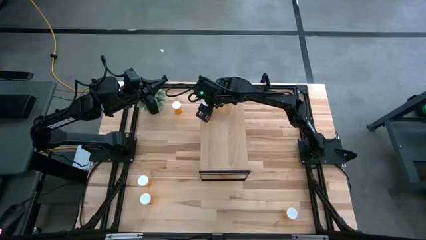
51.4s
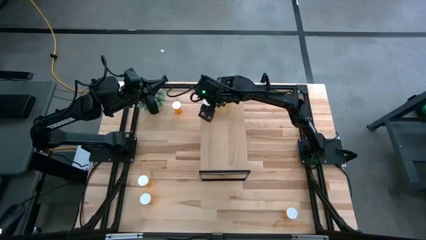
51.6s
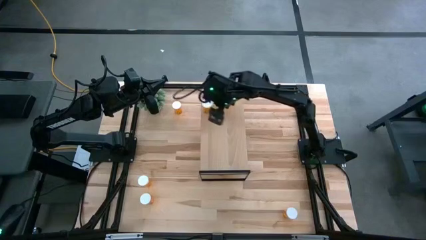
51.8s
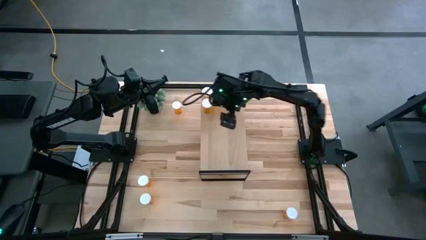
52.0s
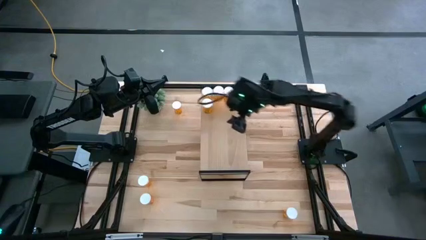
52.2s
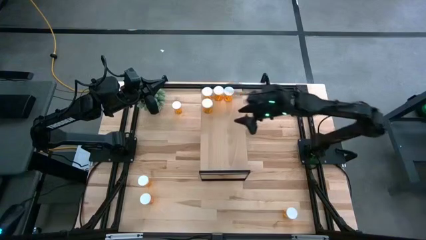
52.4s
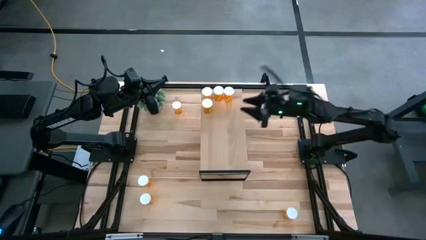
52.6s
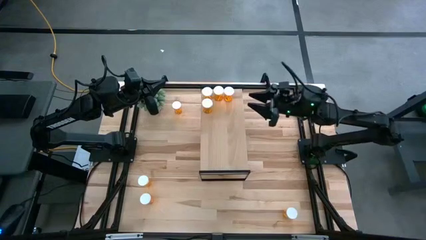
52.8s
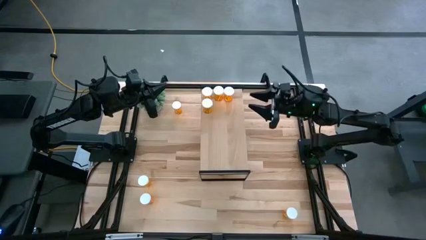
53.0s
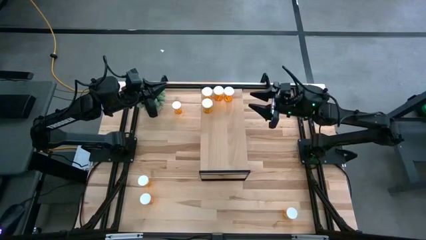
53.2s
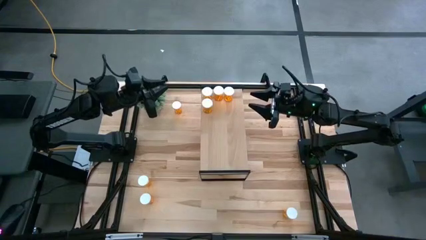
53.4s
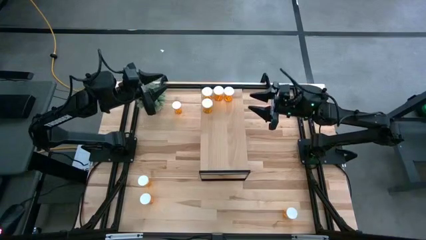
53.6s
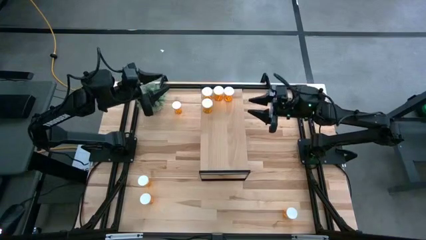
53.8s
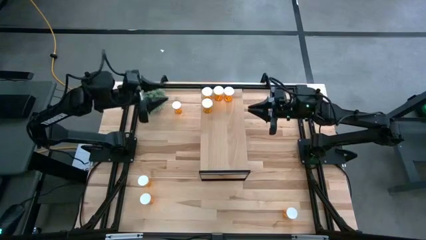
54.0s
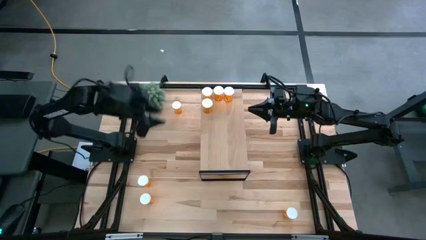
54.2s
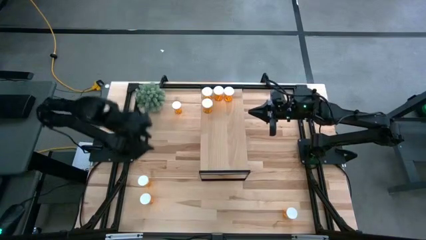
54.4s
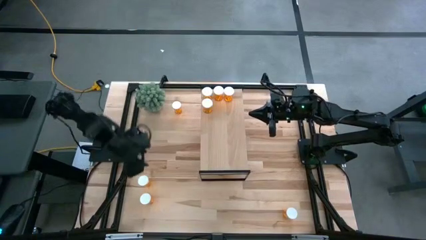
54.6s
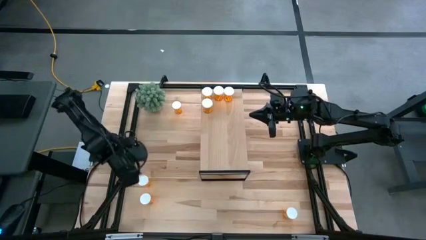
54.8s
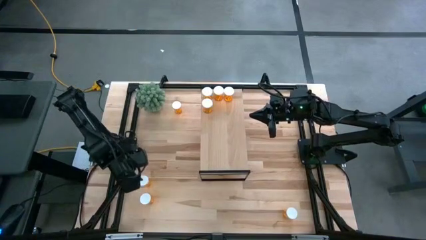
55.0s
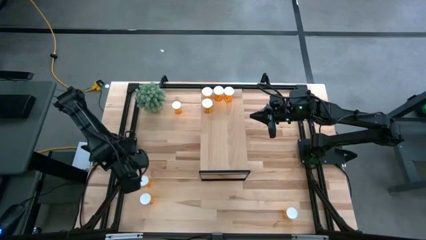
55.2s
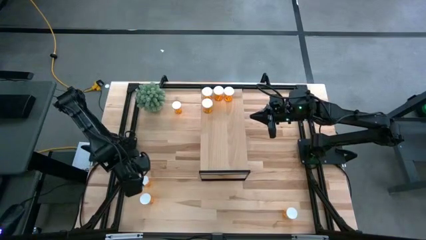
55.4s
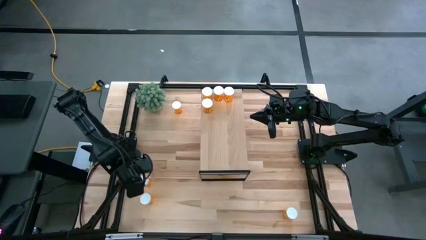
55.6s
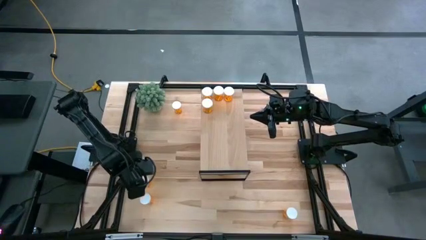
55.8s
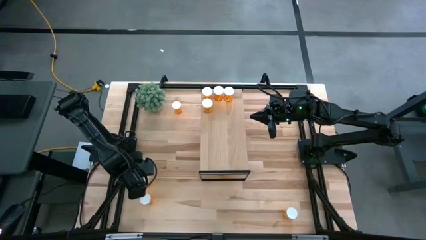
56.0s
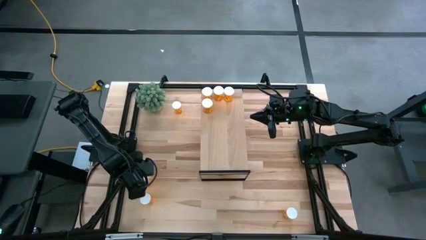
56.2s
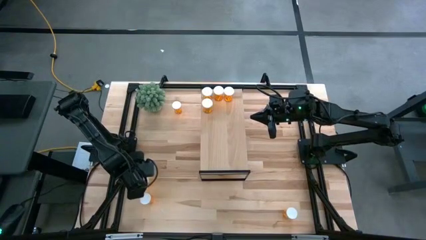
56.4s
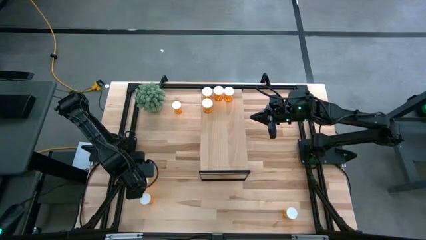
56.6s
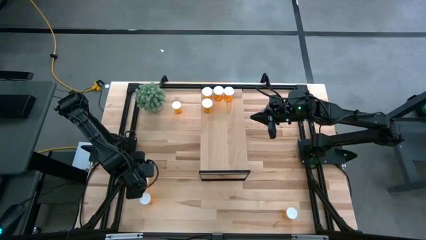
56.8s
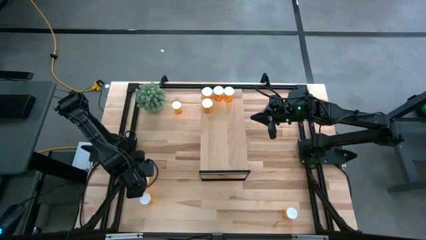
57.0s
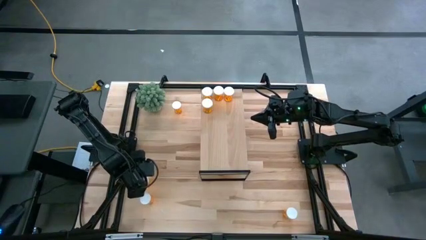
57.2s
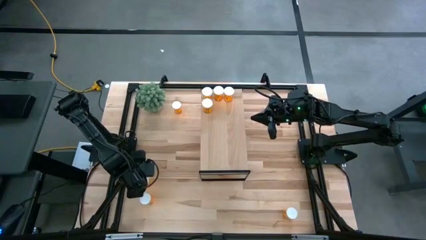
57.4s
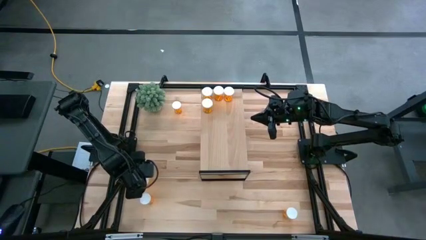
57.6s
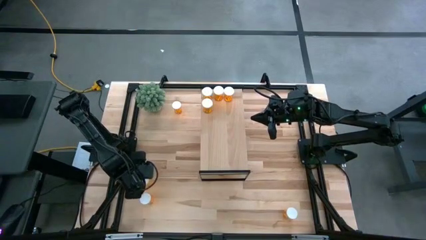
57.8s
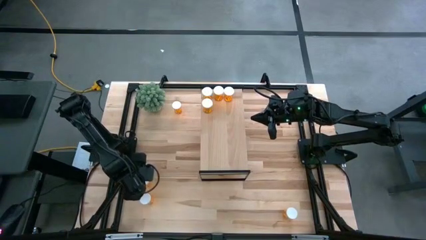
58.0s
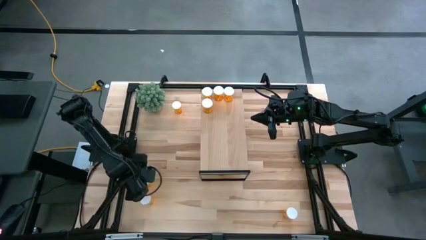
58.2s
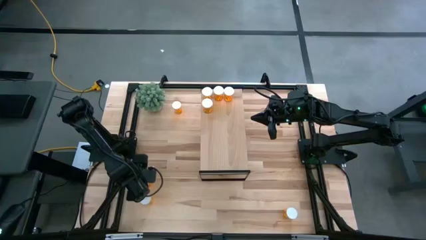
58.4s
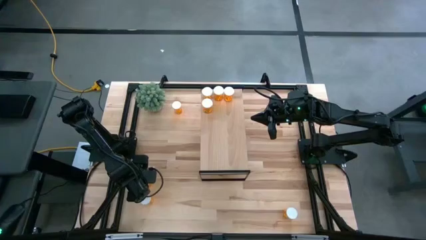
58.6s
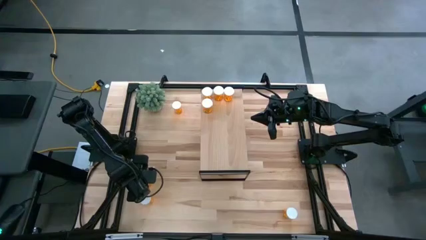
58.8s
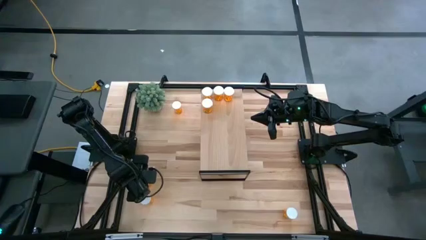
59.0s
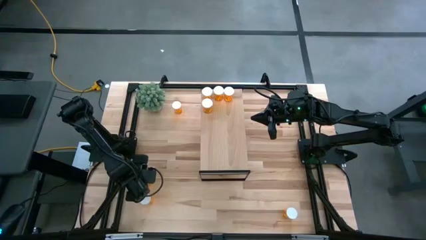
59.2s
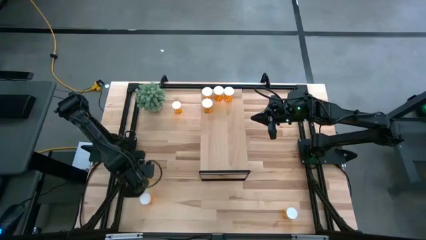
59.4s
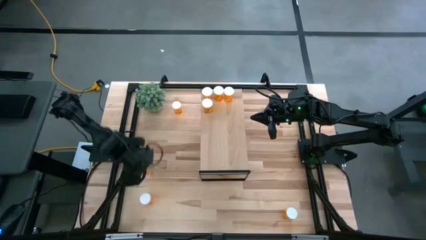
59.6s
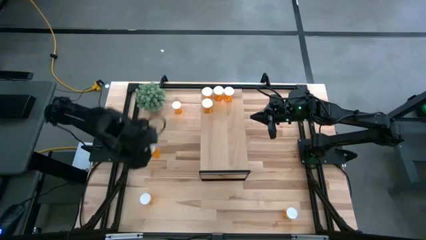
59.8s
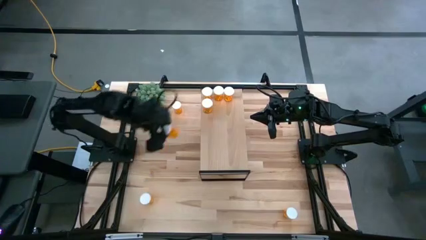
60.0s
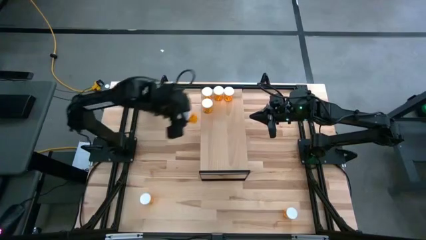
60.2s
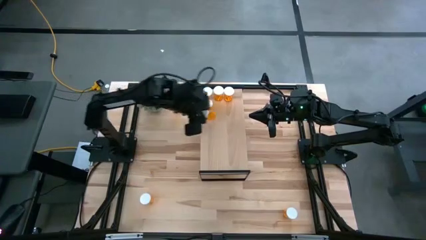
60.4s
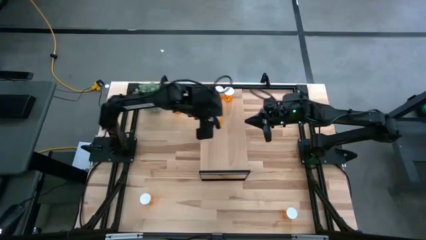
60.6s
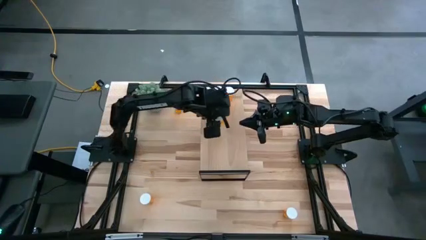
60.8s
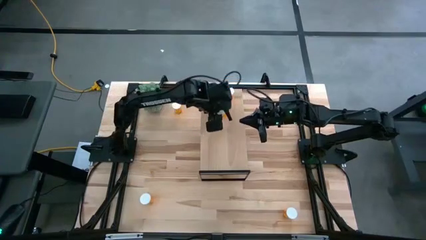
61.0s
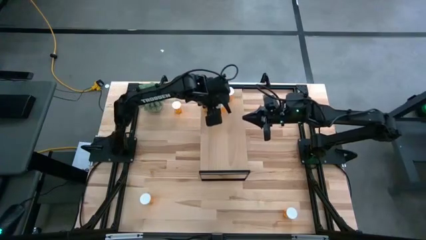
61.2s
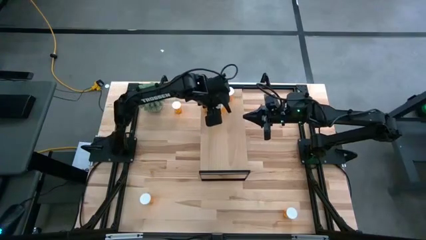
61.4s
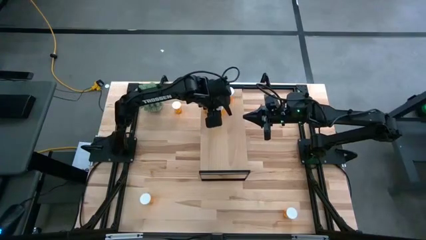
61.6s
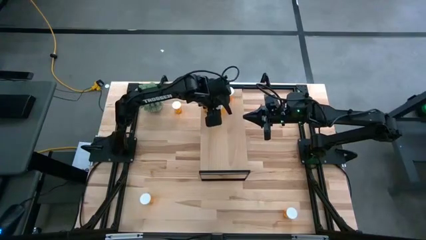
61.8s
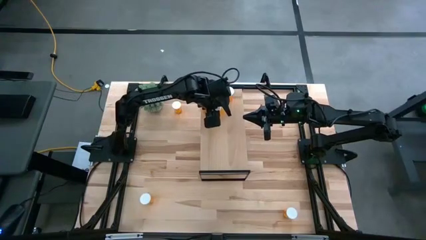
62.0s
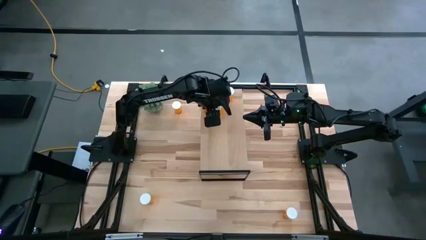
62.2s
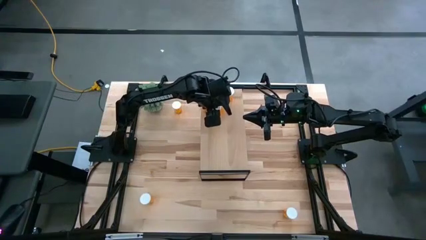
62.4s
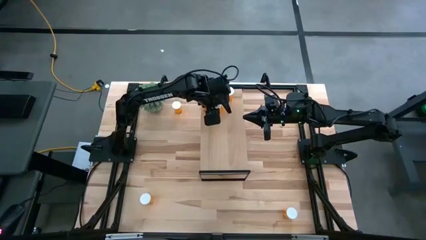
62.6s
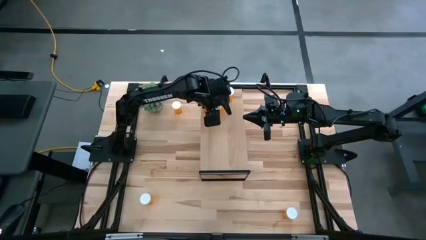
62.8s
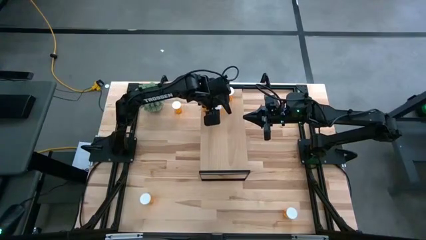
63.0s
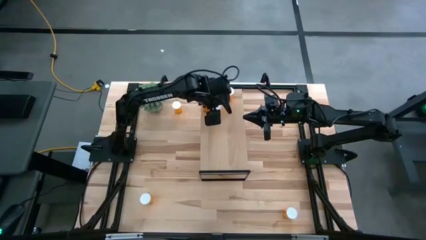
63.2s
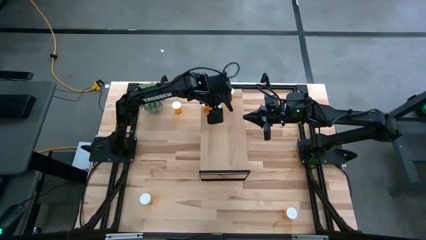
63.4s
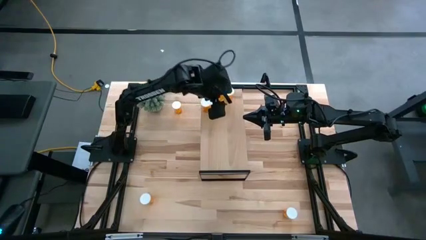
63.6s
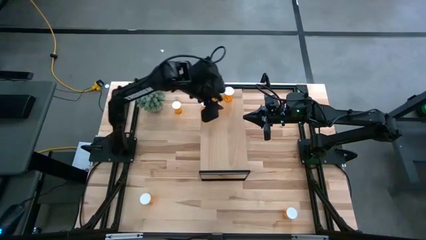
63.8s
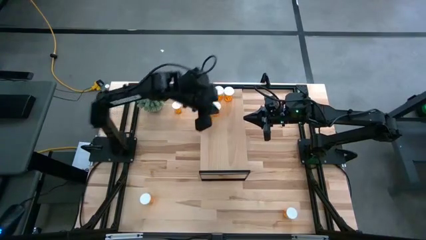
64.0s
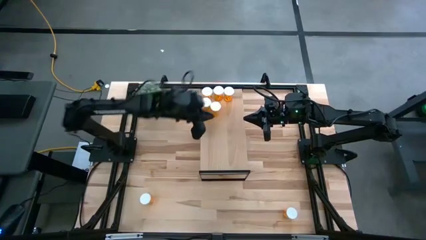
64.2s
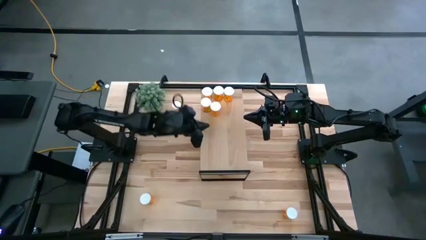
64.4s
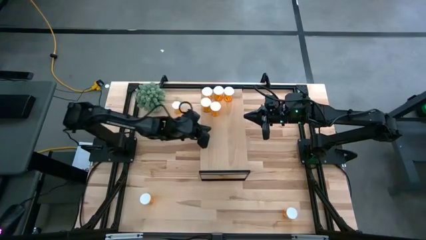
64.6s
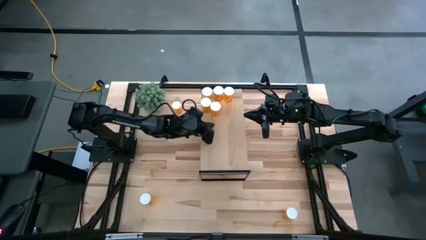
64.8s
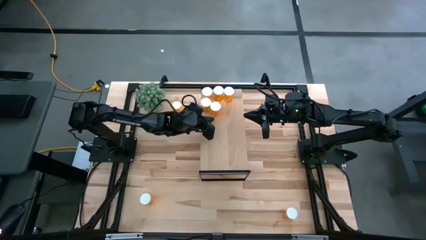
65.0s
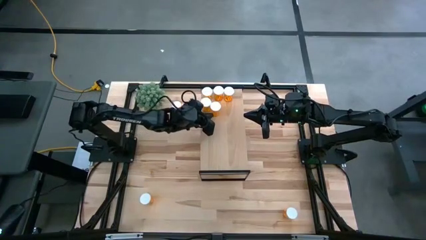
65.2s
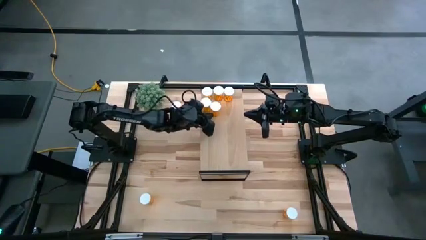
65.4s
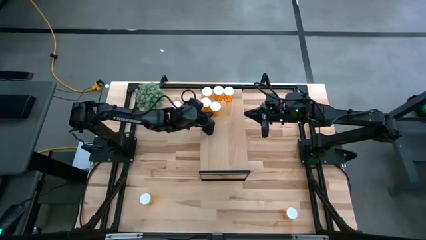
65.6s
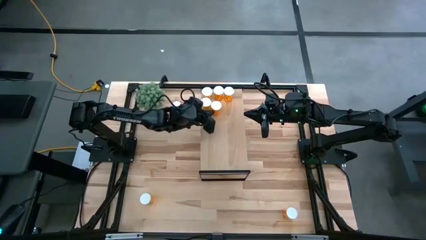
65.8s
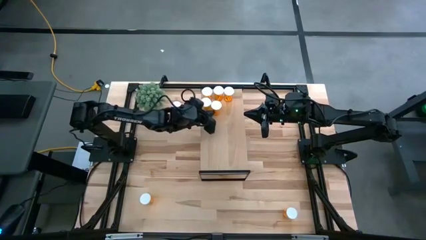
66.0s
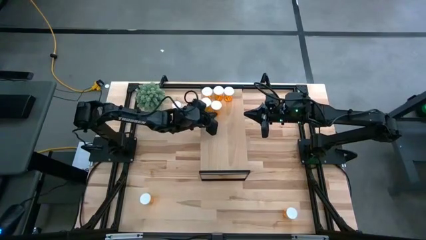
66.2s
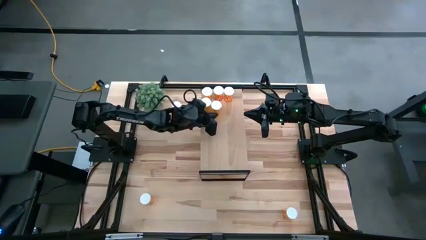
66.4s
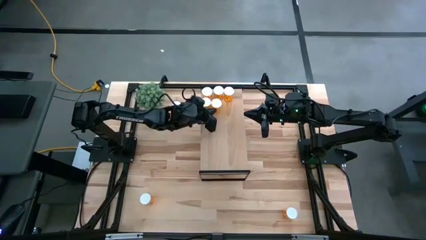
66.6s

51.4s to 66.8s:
Task: Pick and place medicine bottles onto shelf by color
Put the orange pill bottle on the shelf

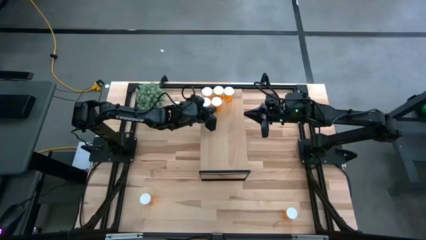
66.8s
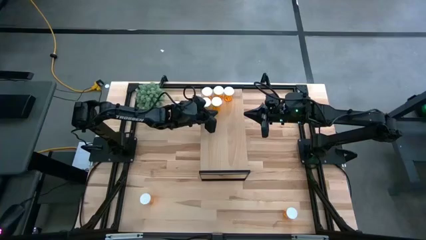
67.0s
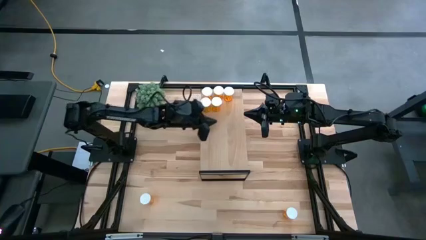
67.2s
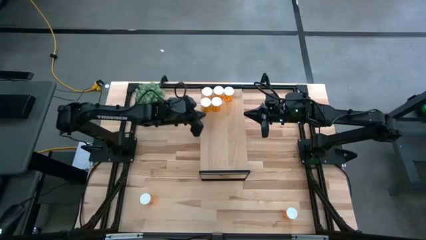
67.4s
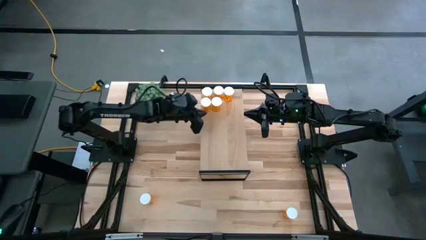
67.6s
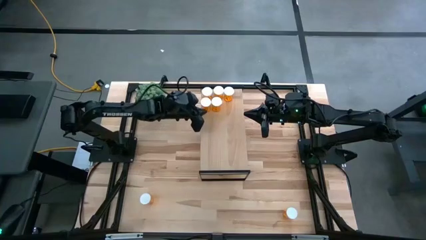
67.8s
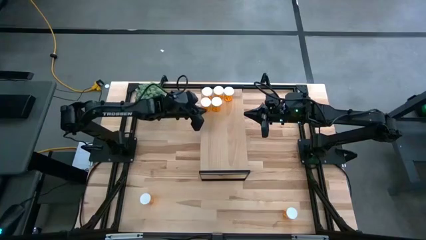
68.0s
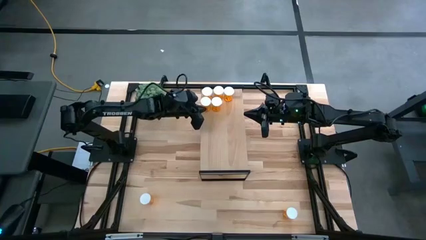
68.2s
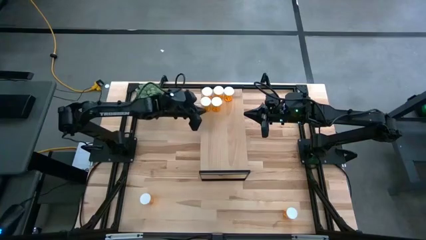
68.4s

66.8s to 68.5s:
Adjust the pill bottle on the shelf
